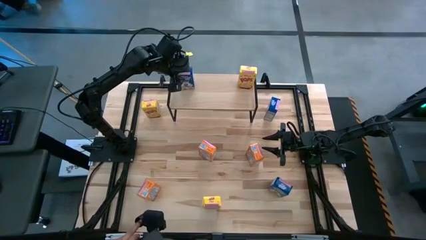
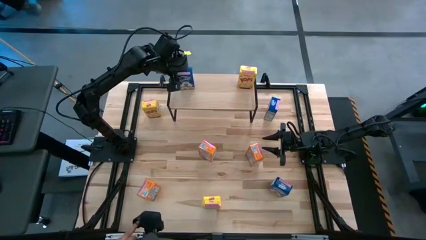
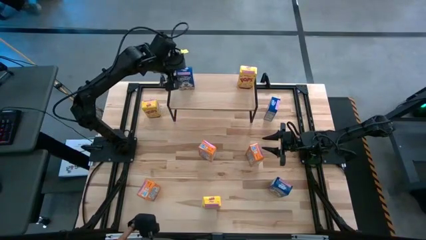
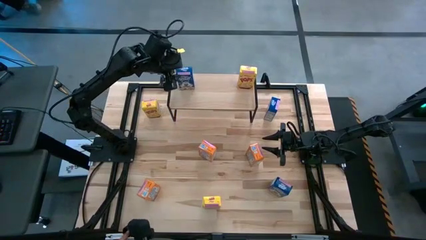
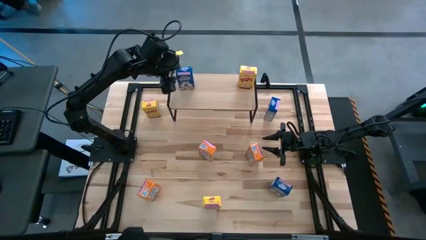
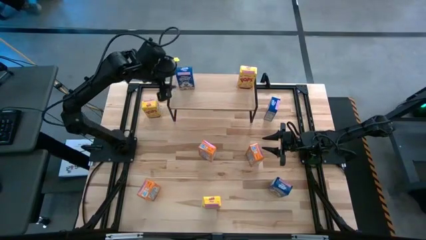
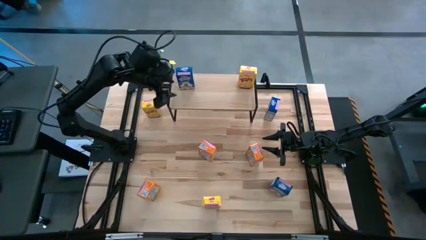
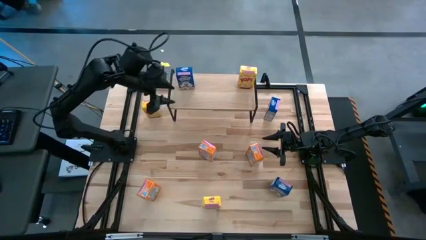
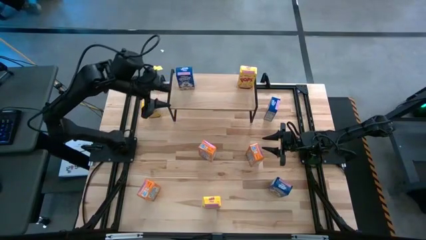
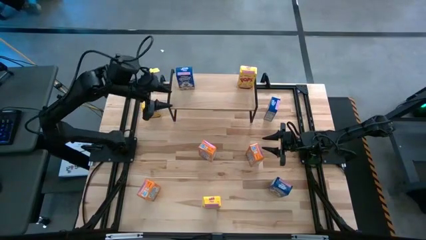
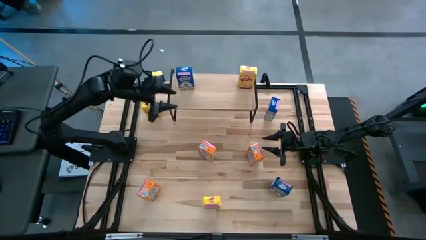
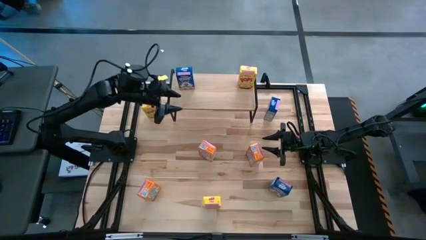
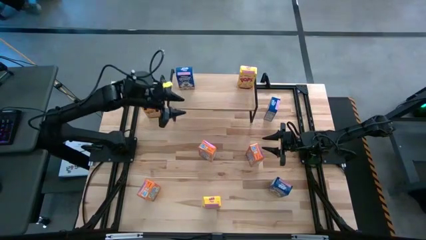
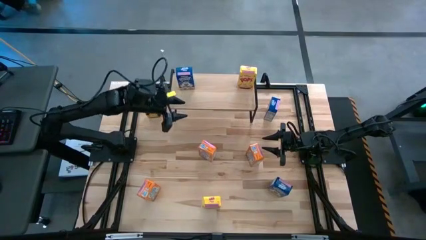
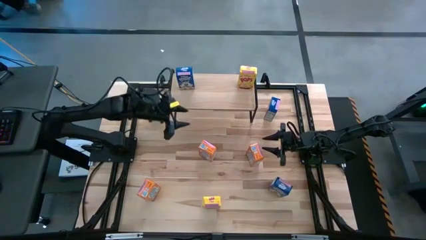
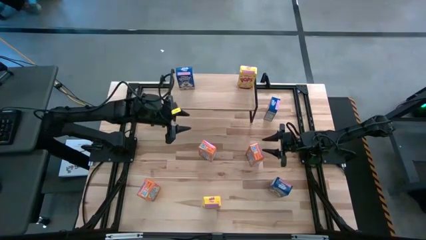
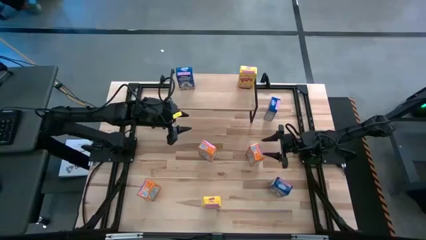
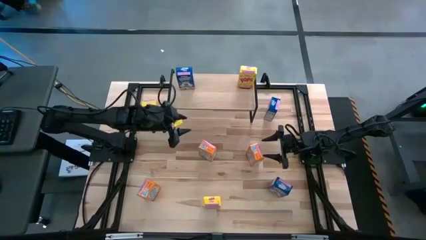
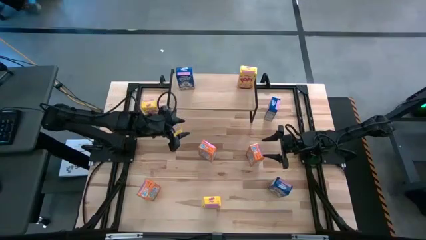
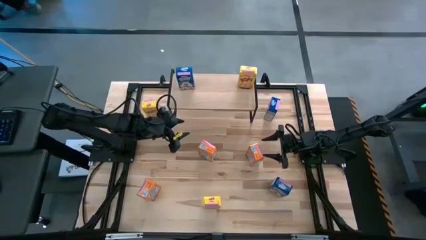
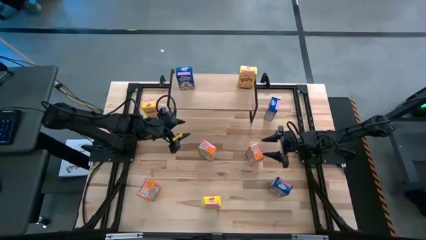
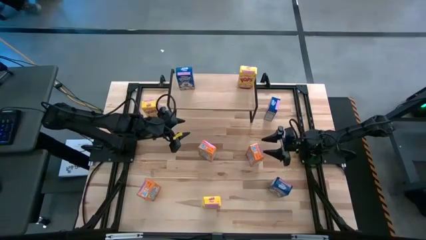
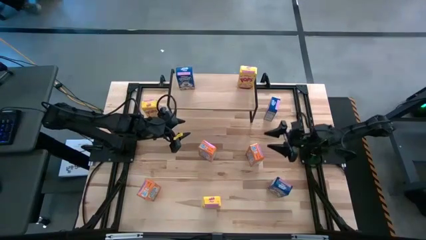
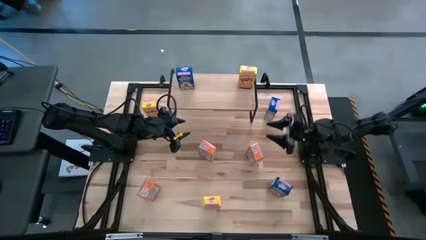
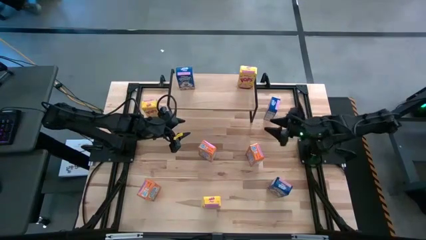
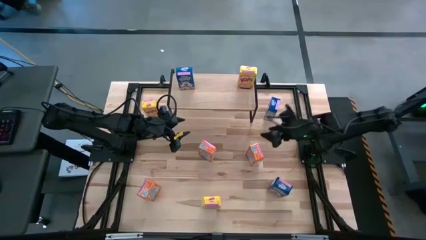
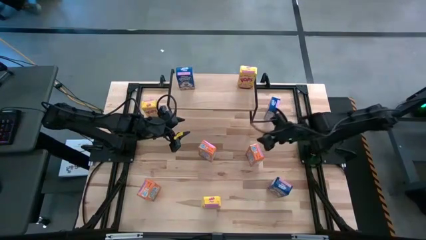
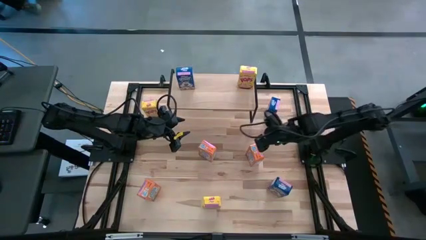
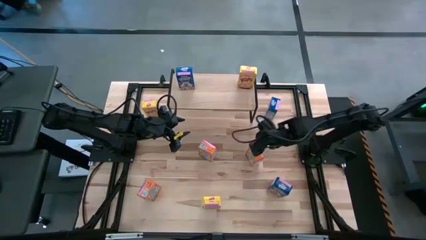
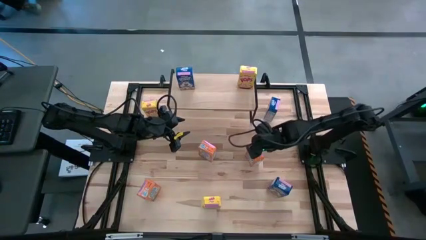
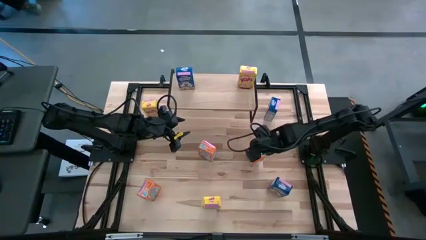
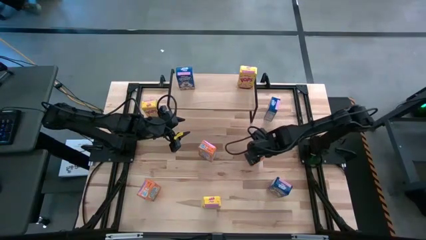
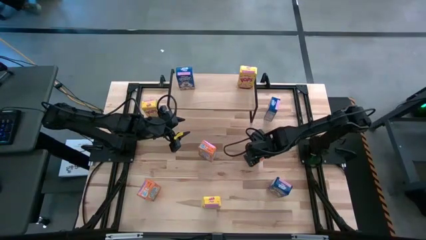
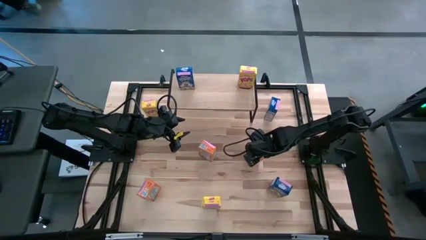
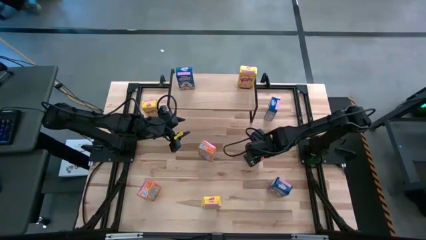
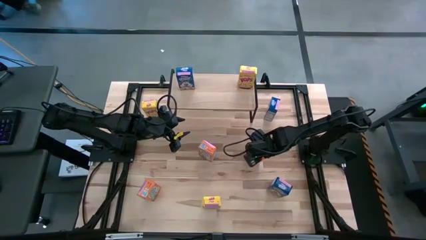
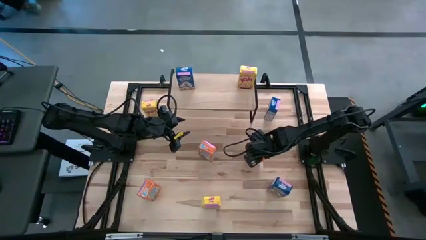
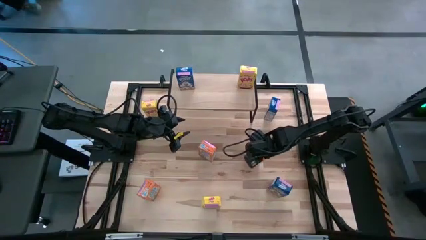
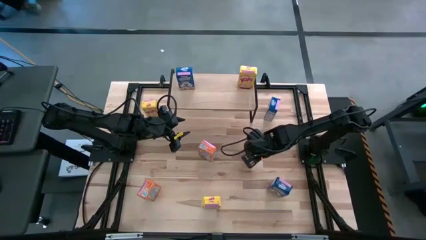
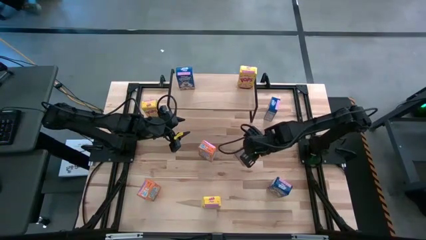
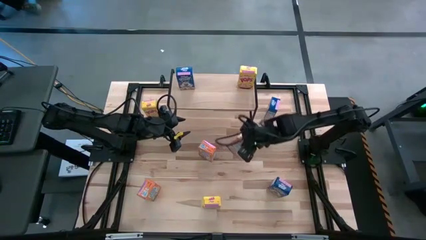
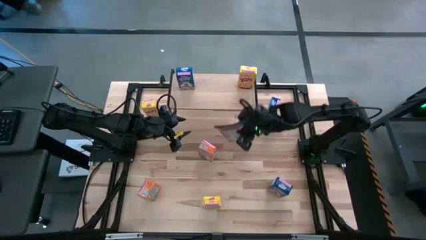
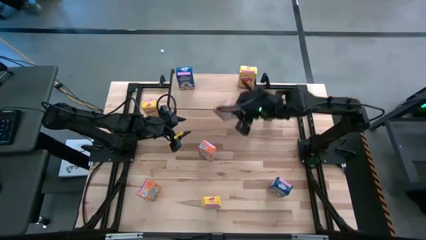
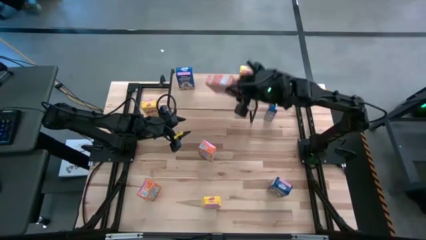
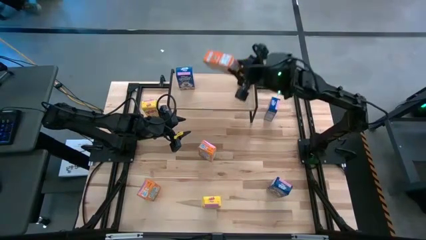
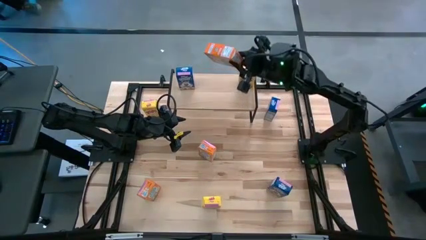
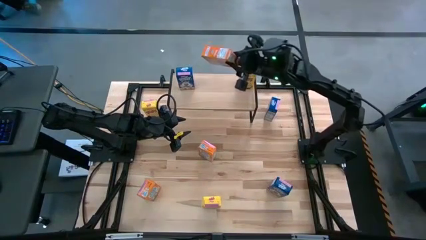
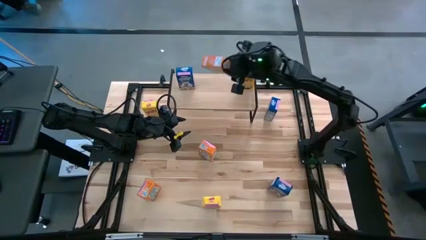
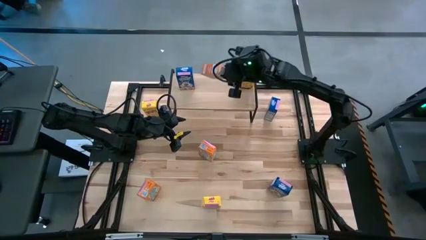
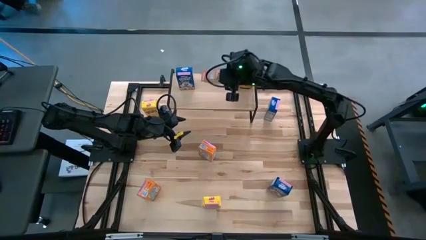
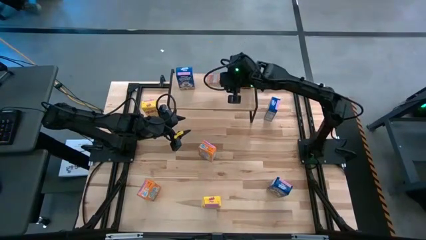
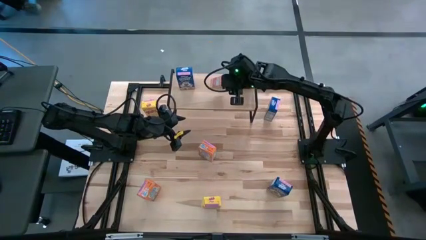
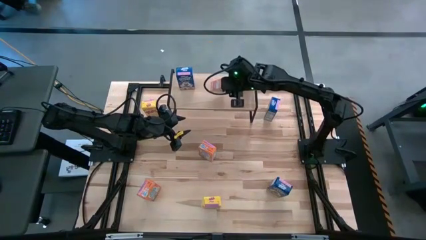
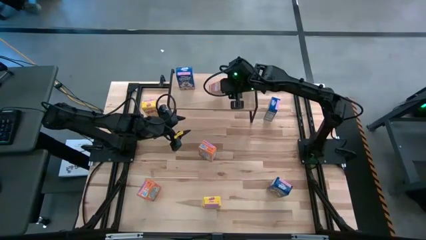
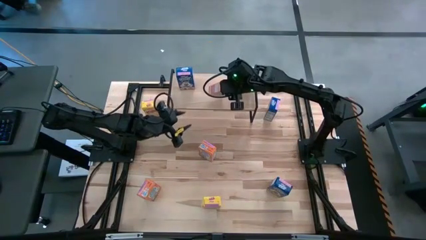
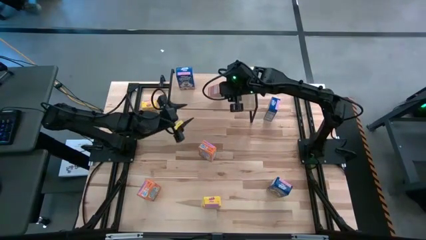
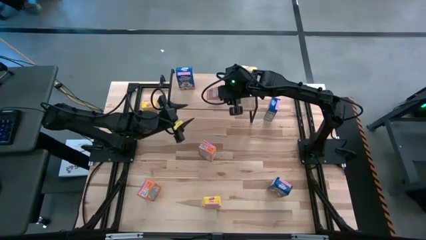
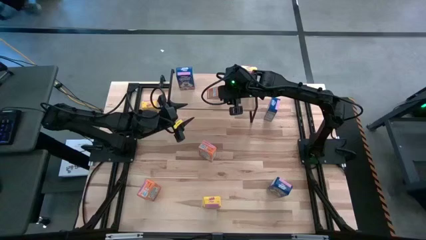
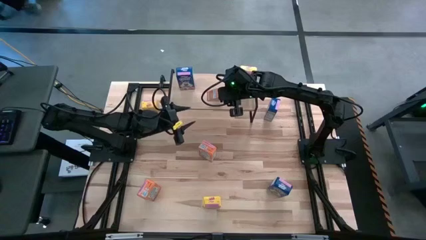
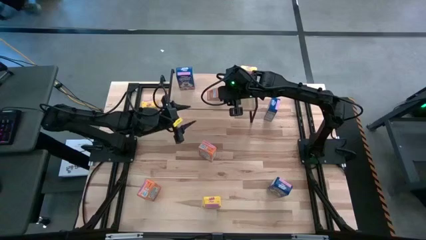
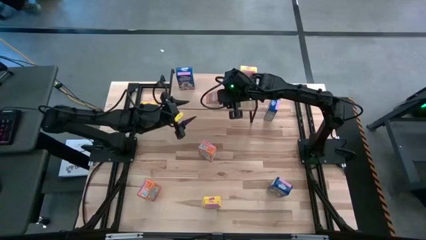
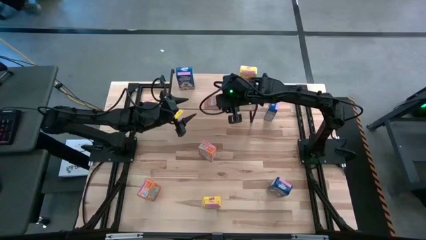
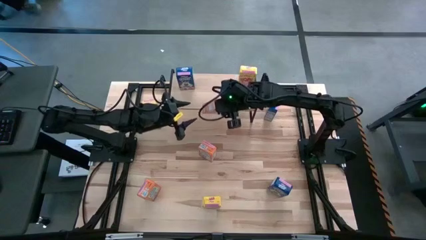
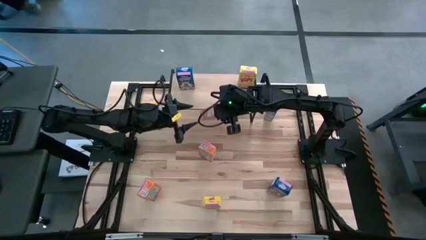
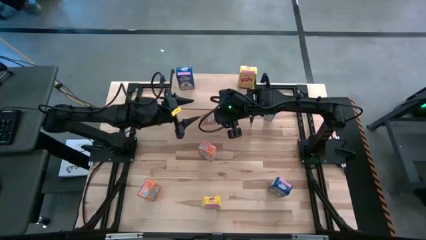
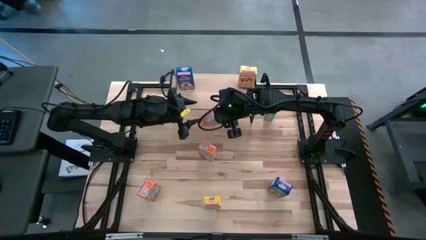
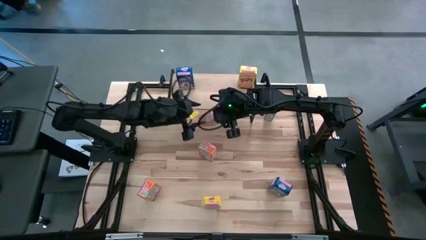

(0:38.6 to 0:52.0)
Task: Stack cereal on shelf
Put the top right orange cereal box on the shelf
